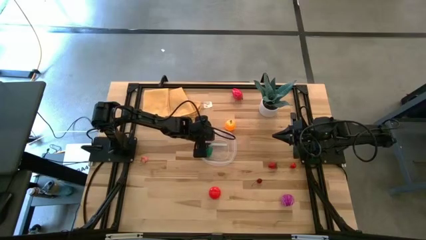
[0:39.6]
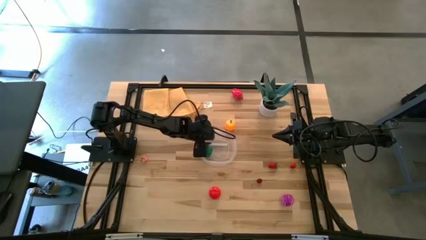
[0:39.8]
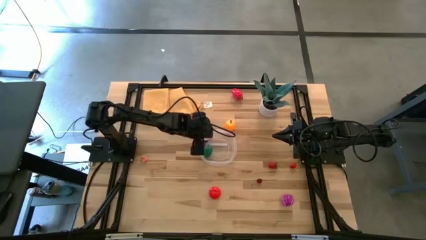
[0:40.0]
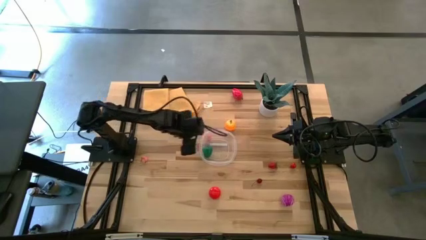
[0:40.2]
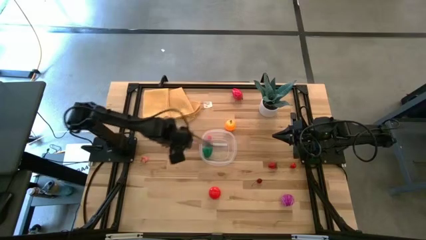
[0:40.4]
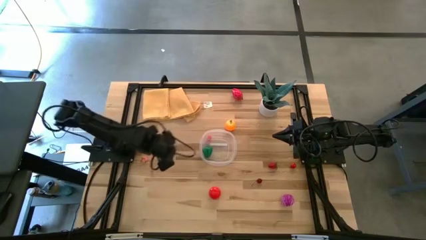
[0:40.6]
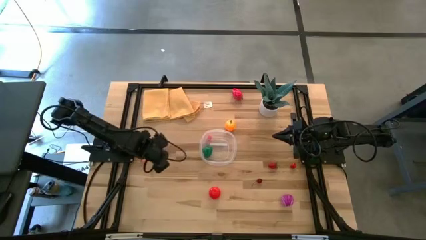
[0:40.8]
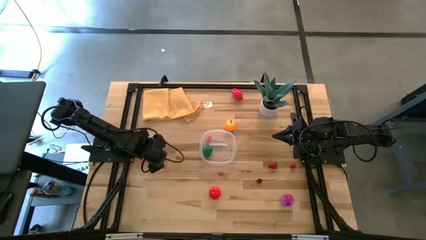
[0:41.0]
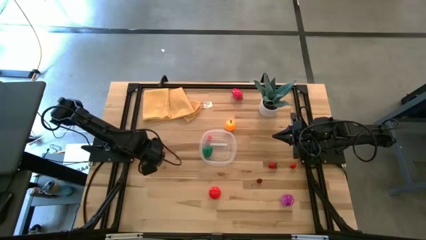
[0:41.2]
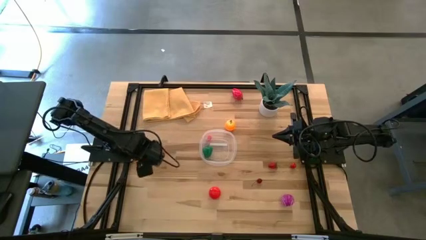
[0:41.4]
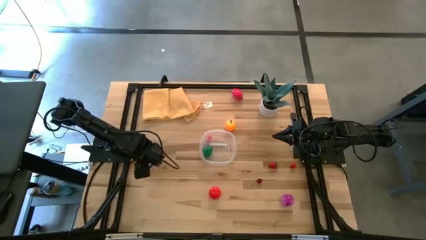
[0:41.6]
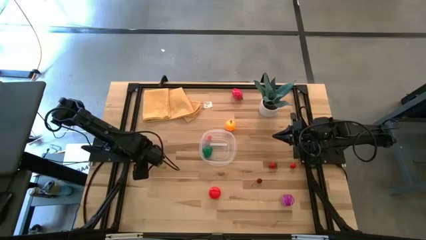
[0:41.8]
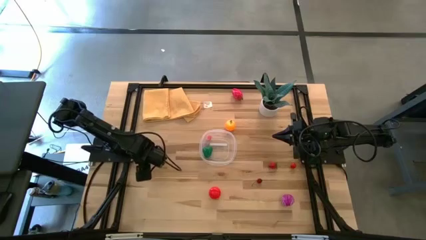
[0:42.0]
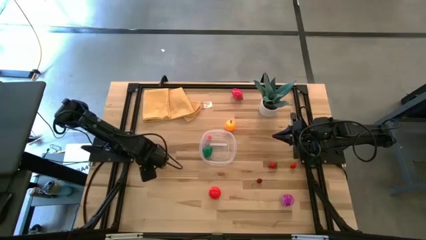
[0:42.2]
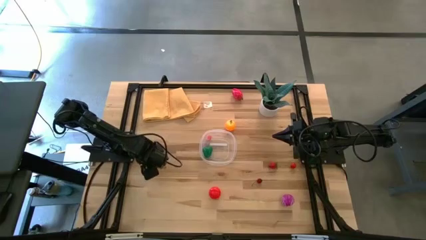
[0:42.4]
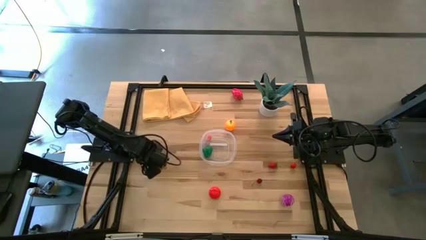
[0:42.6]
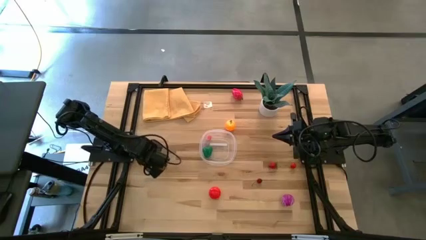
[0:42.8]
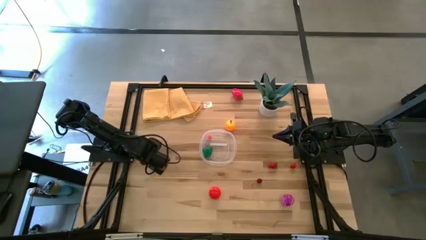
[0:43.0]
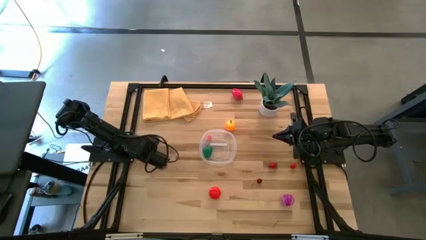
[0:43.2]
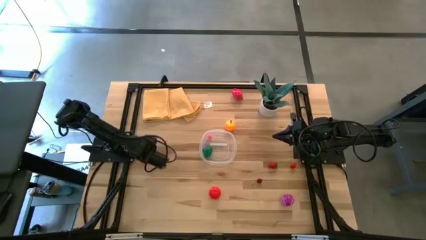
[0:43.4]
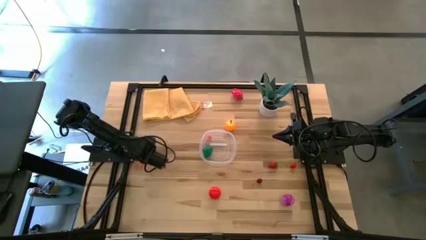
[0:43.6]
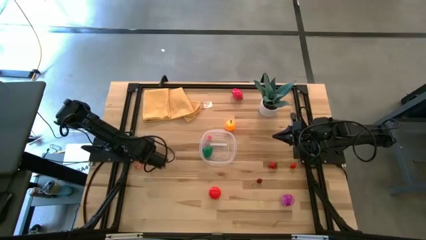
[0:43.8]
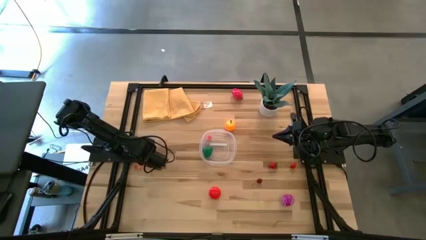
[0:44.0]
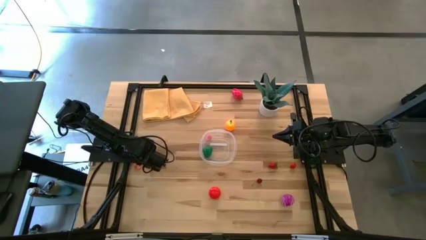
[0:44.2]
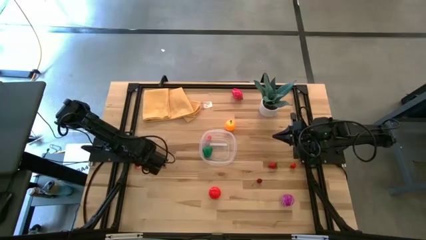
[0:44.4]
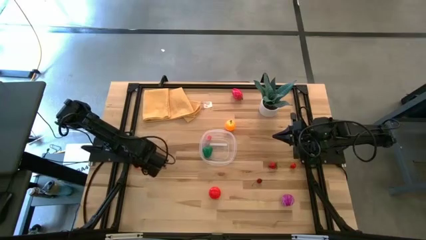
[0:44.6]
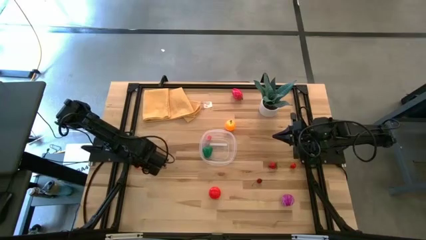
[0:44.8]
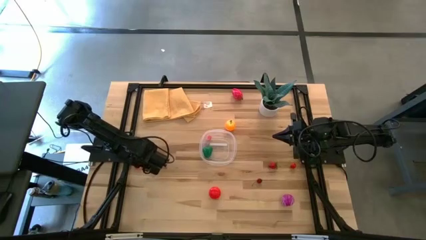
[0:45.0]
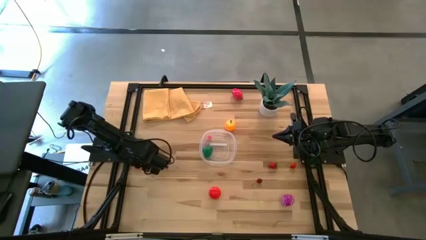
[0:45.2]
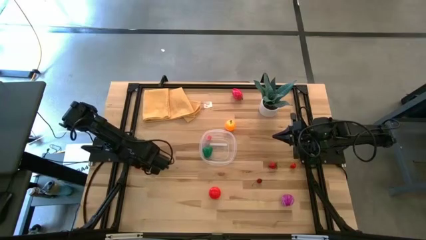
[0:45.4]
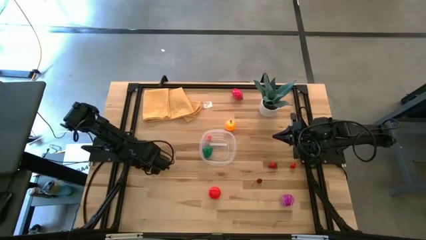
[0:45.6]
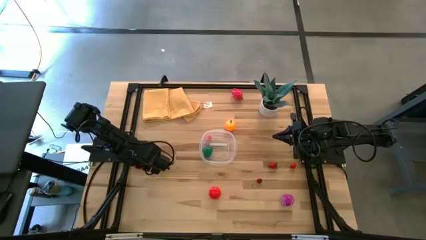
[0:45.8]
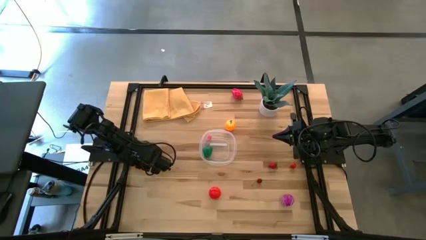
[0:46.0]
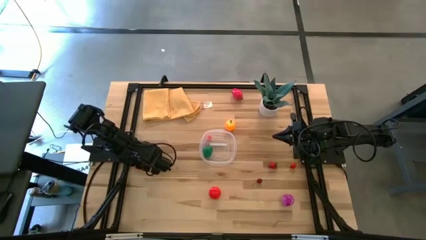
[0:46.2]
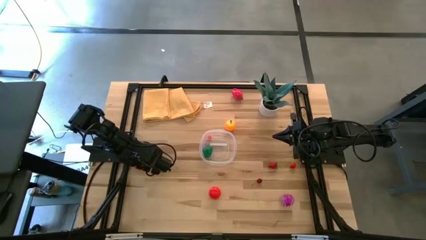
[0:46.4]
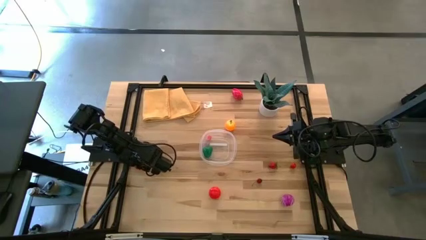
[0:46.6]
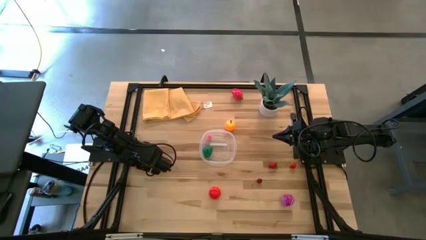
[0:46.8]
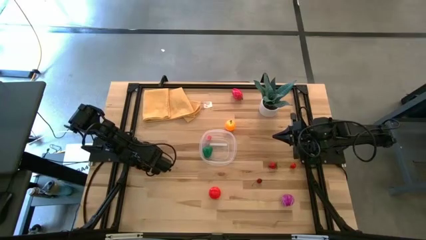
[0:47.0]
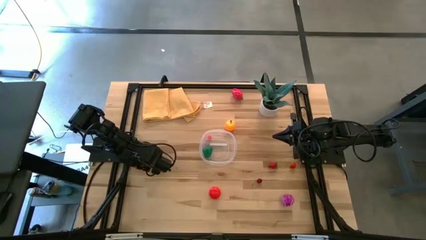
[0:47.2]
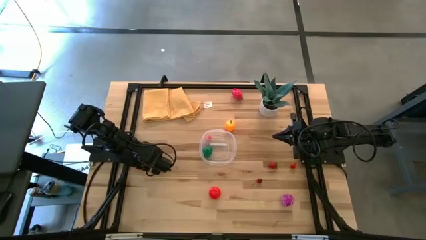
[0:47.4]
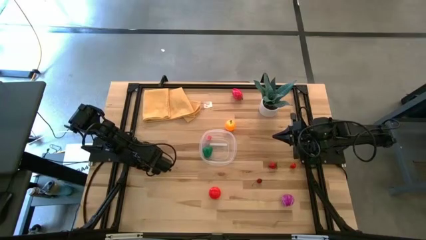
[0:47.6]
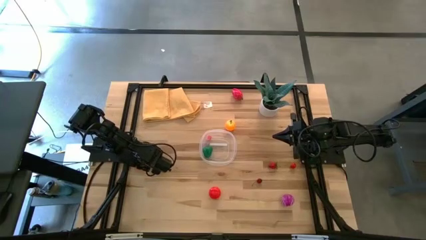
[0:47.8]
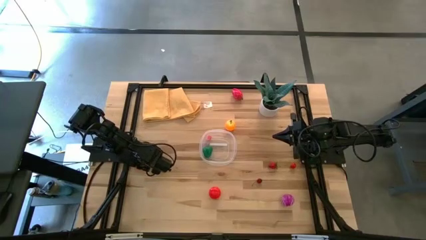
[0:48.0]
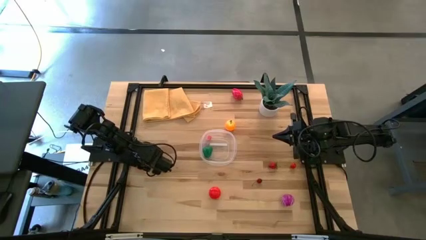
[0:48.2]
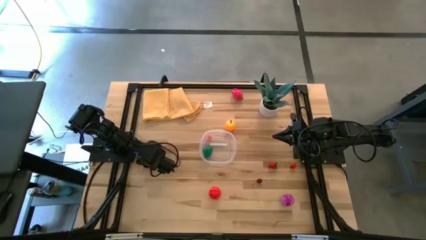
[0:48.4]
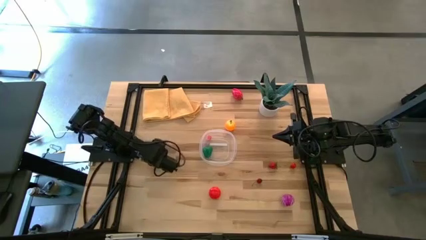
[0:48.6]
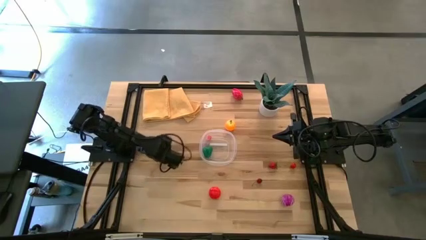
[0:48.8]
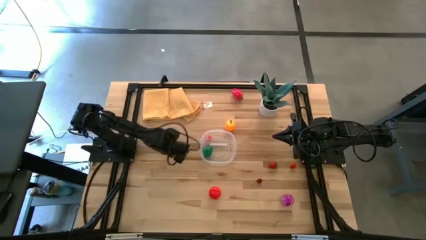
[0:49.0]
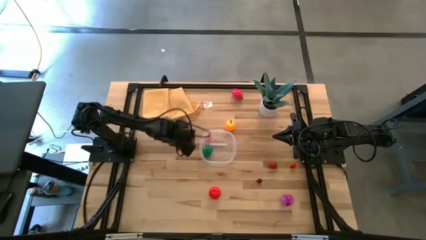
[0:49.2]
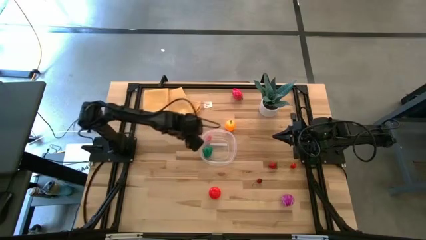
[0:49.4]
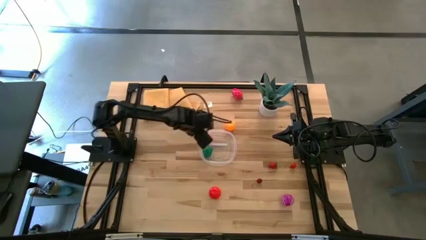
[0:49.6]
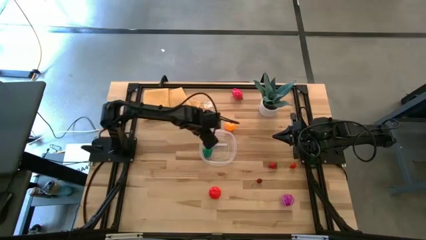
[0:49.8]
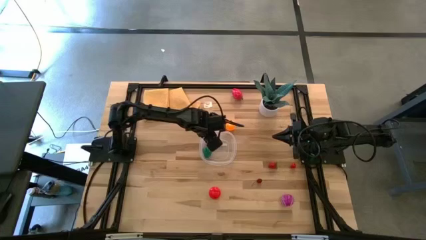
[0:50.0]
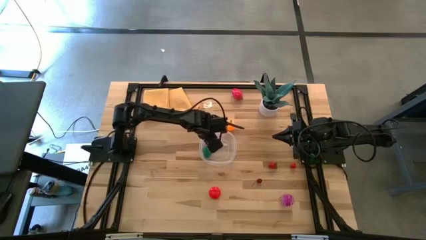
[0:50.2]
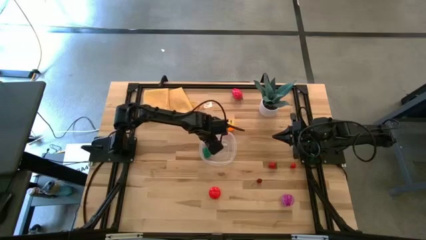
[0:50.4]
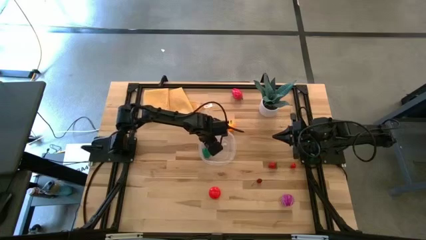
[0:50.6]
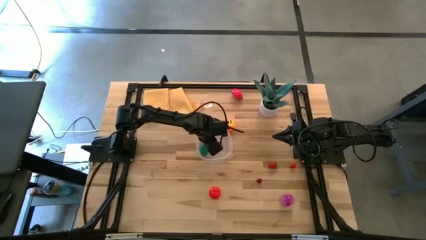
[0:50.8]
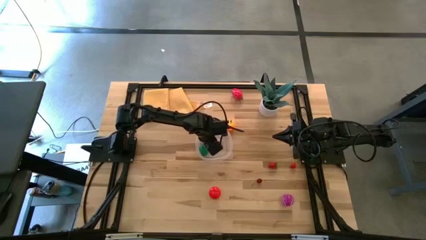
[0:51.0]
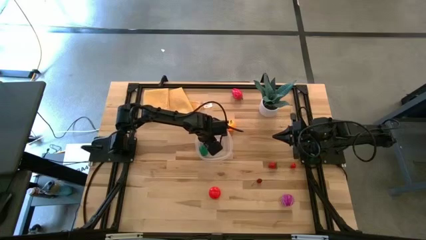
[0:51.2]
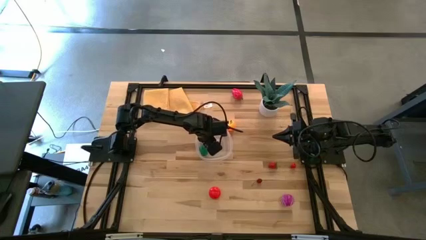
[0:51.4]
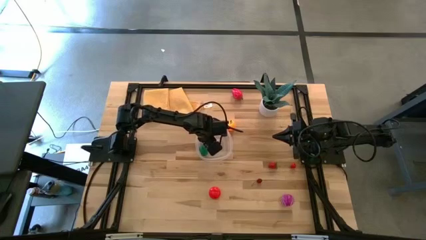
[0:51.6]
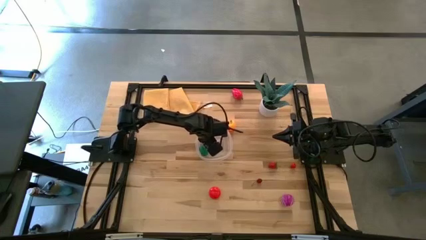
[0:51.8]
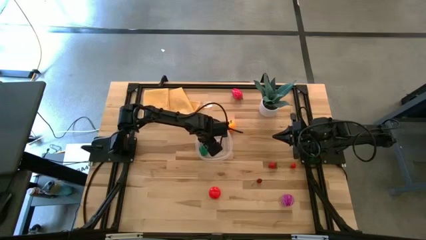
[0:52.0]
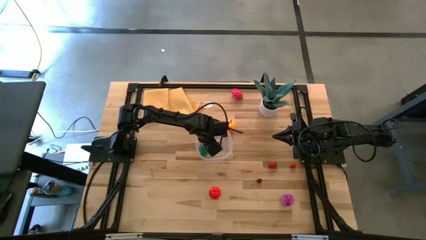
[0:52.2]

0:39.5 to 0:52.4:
Task: Pick and placing Produce into tupperware
Put the pink peach into the transparent bin

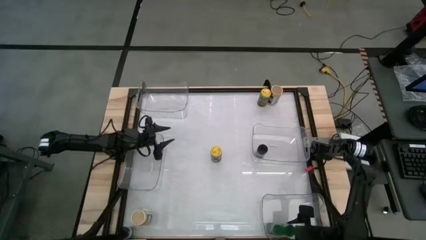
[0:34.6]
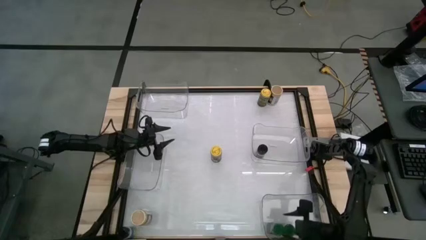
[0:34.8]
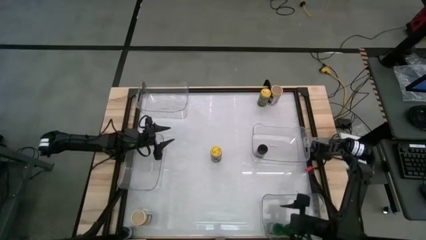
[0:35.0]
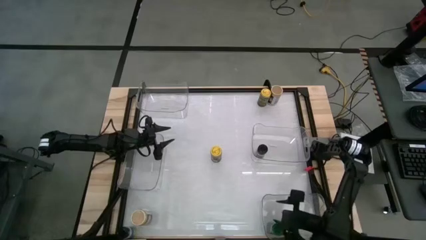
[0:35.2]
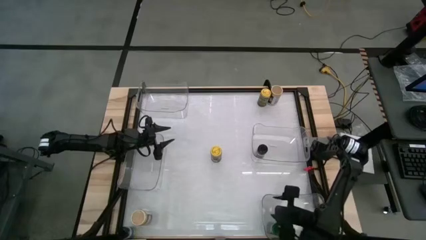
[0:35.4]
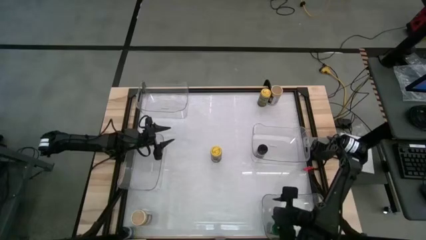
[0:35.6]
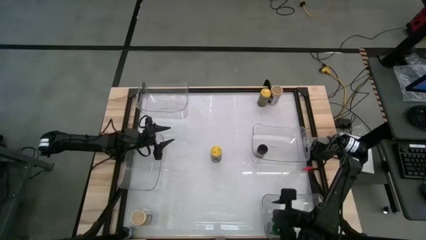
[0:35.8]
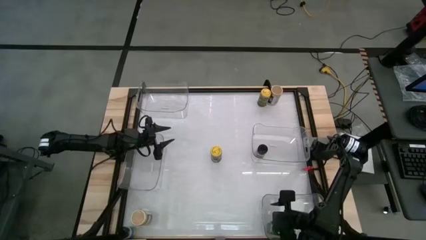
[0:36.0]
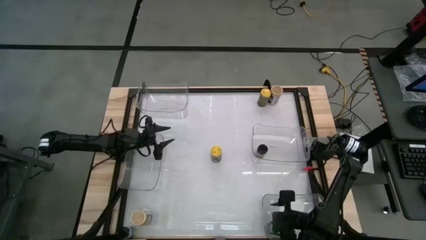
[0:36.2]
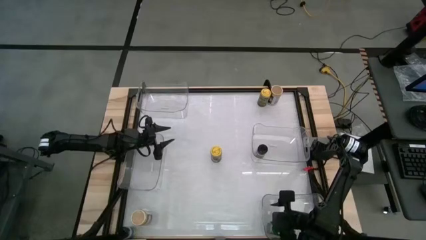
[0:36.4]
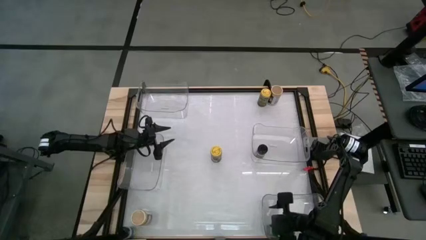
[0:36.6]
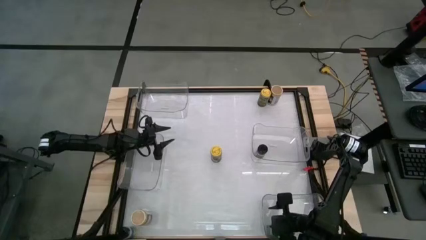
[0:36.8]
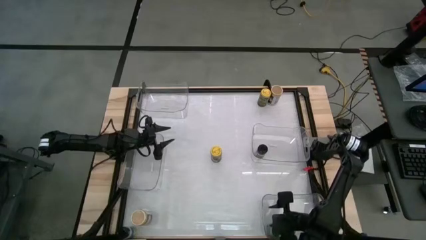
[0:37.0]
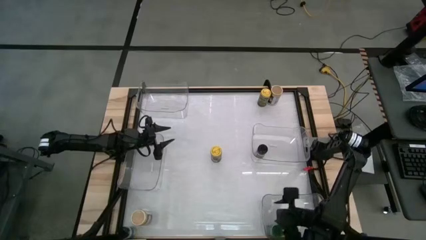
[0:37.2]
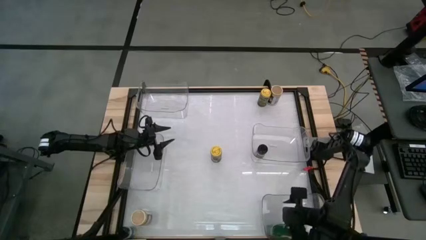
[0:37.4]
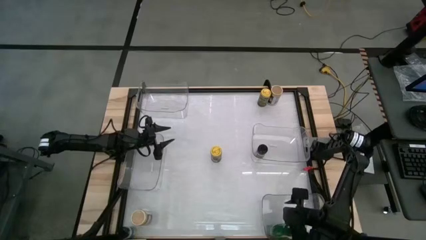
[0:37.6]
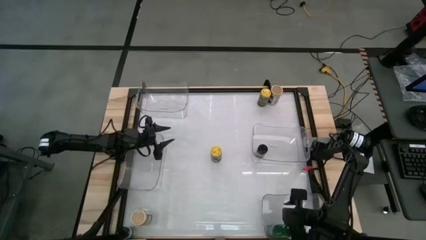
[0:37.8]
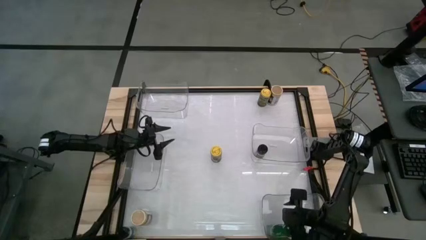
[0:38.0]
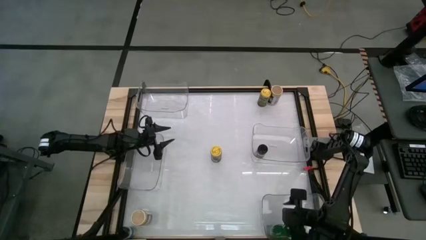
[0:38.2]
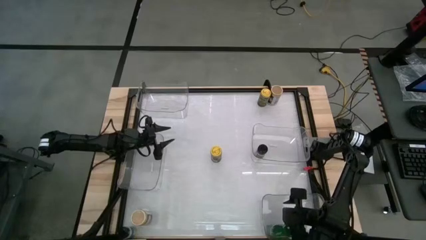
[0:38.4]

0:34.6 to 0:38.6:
Task: Sort spices by type
Adjust the green seasoning bottles in the transparent bin
